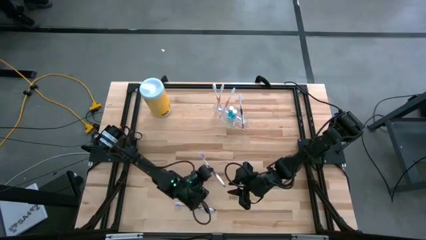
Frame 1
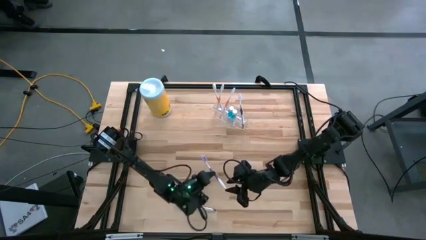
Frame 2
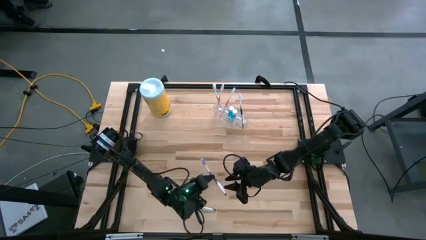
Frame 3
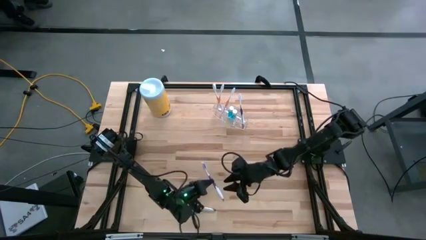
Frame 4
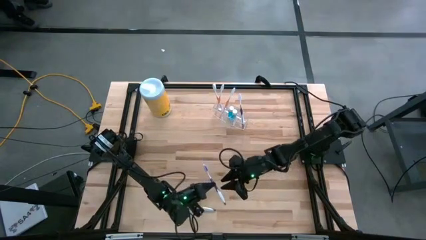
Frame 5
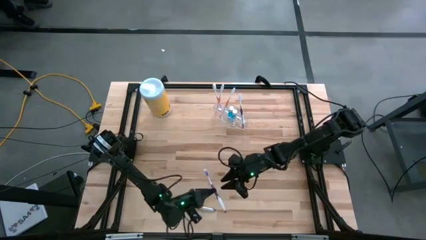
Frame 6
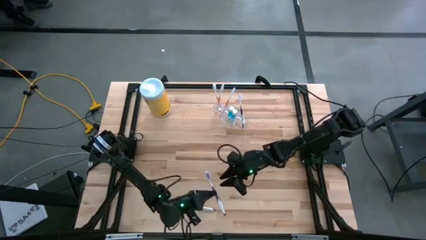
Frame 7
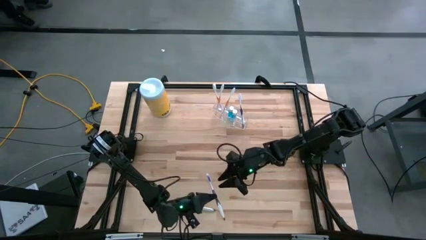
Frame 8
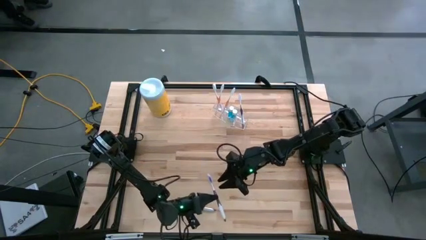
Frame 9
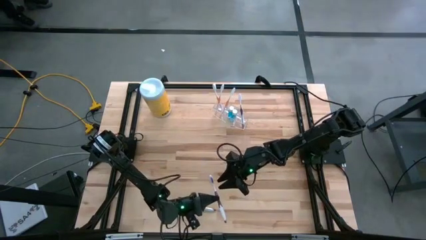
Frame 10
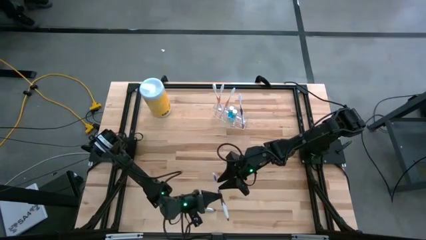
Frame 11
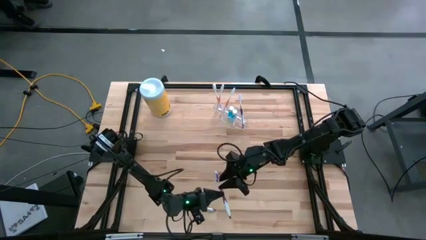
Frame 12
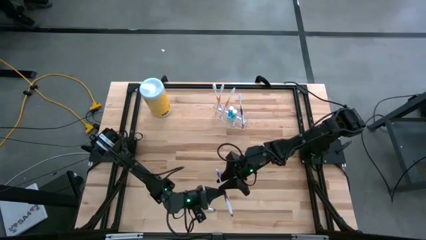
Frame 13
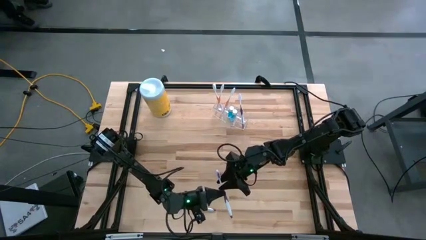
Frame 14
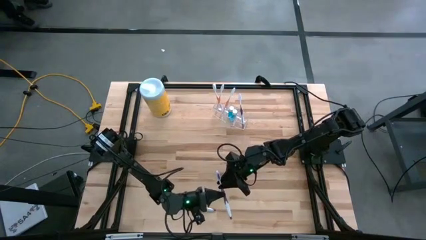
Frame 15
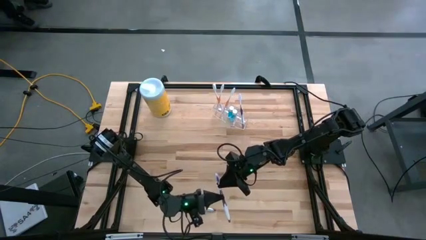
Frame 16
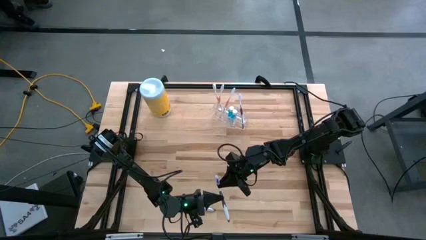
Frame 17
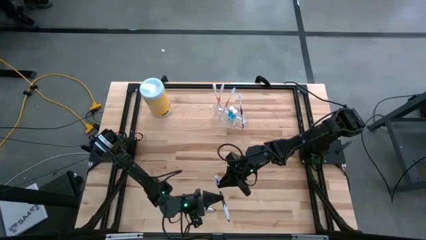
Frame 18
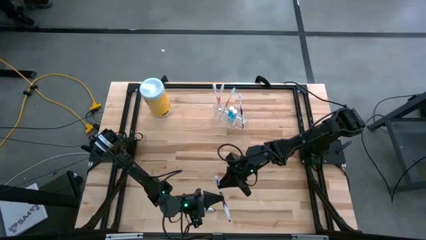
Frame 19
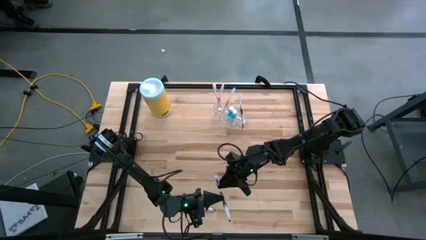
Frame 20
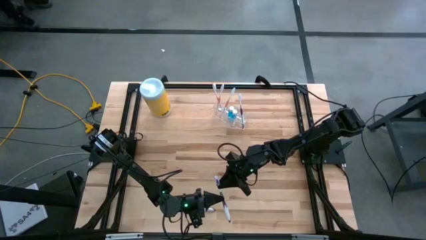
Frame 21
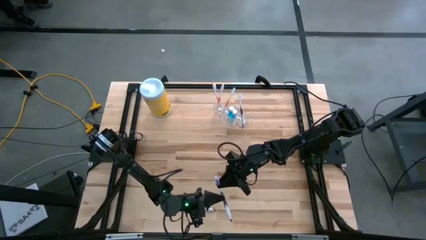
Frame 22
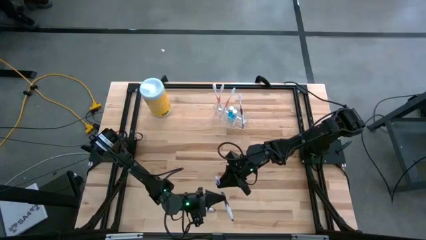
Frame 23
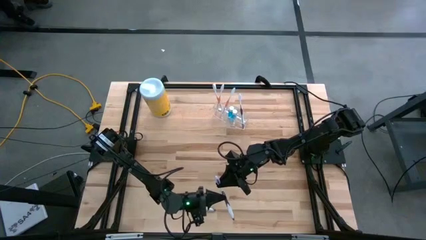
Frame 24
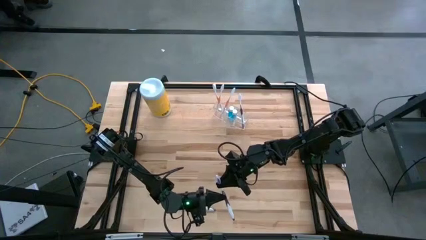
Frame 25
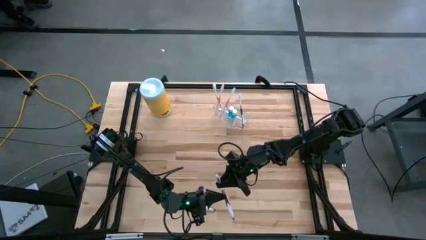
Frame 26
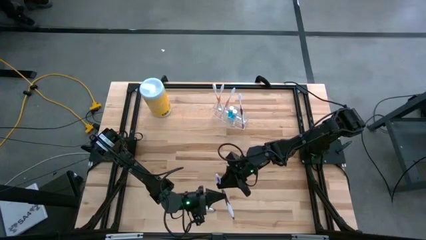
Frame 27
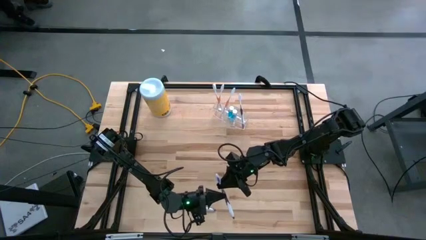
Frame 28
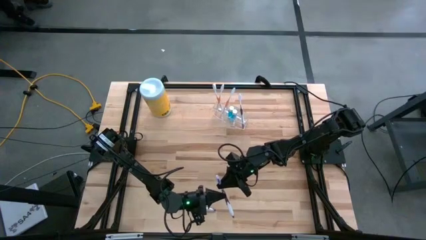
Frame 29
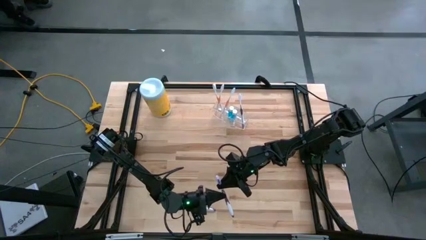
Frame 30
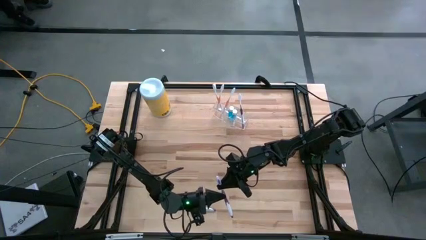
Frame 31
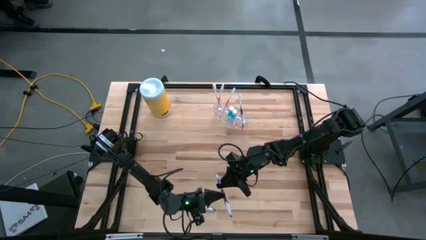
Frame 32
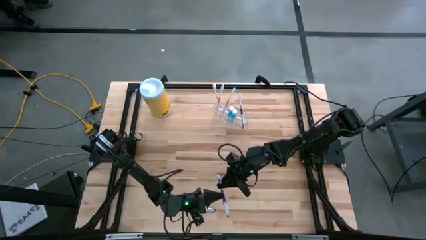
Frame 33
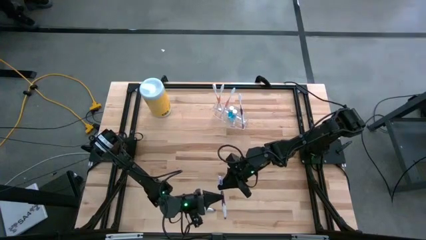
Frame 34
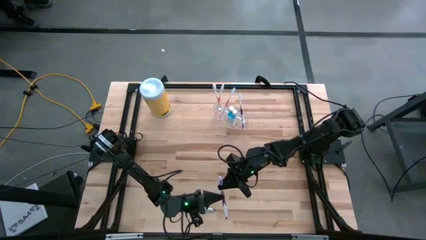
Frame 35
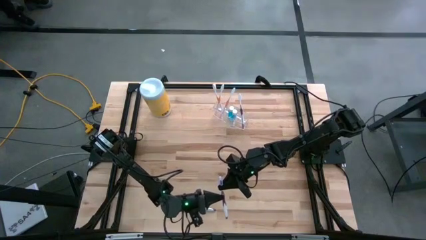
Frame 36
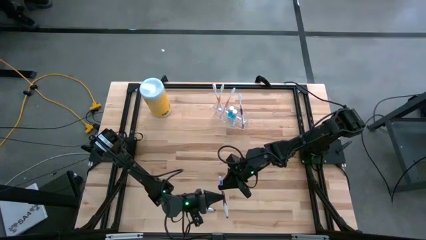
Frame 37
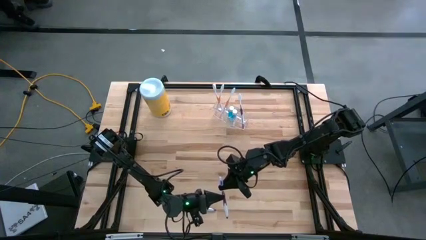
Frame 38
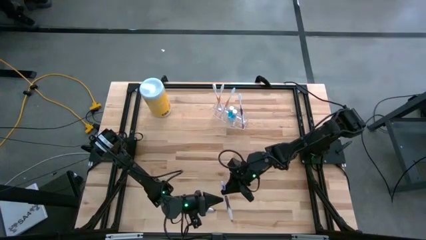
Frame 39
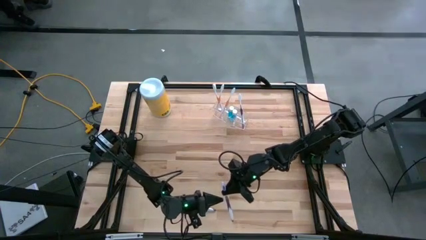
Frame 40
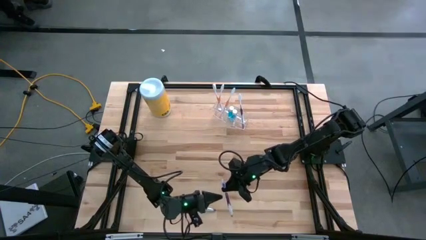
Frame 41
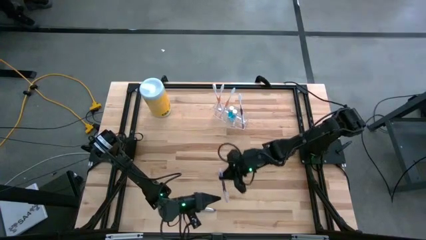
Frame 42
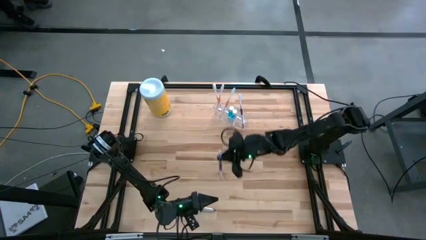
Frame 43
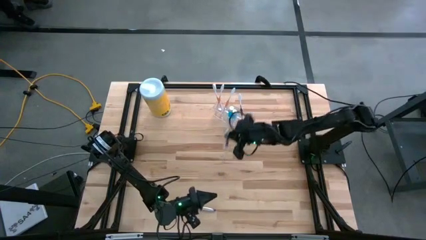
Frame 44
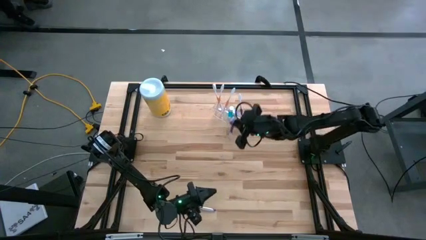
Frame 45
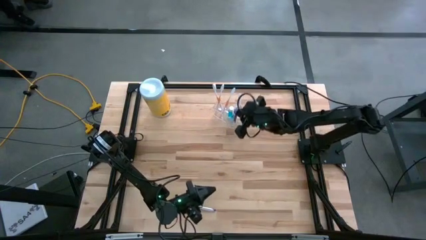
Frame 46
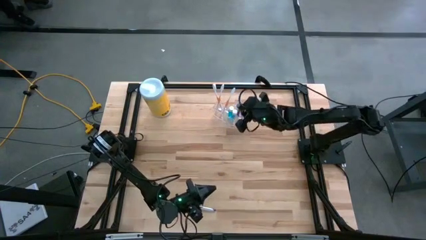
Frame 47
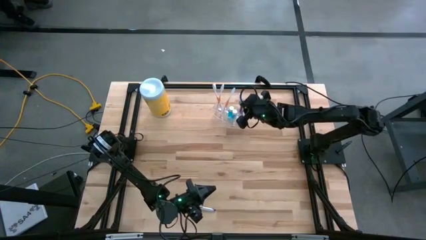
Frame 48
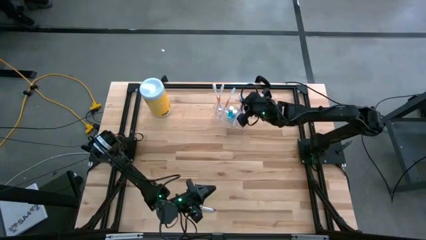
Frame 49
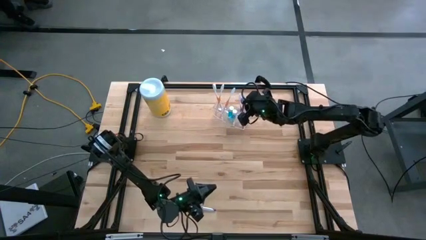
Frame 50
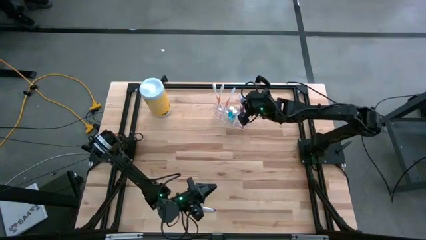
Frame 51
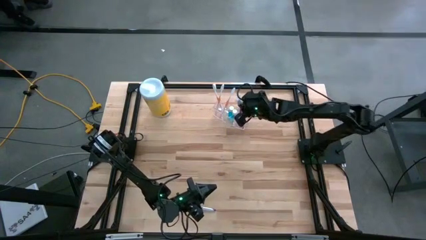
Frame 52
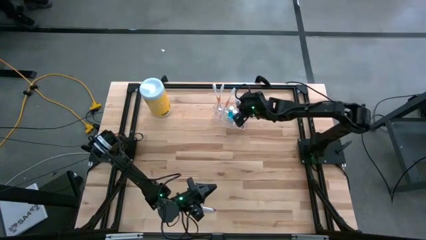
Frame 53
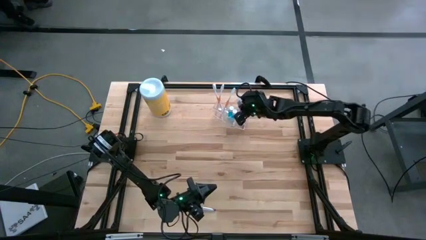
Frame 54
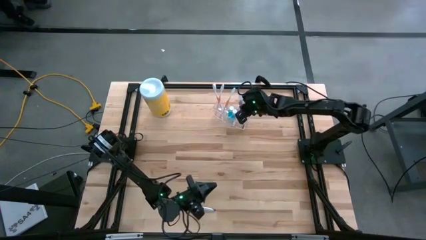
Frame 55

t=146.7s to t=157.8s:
Task: Pick & Place toothbrushing station
Put the top purple toothbrush into the transparent organizer
